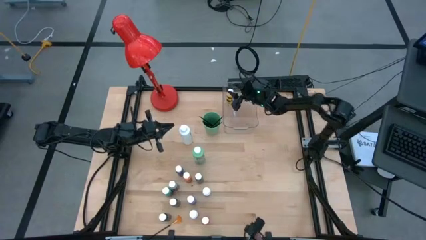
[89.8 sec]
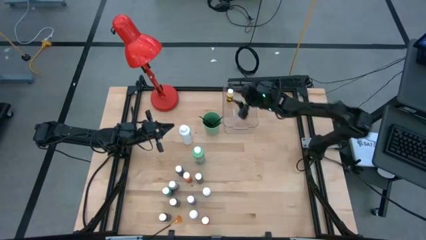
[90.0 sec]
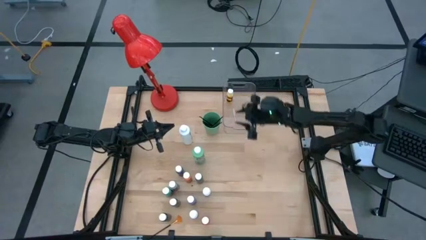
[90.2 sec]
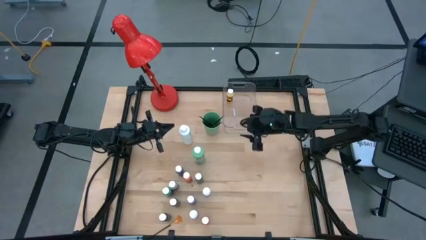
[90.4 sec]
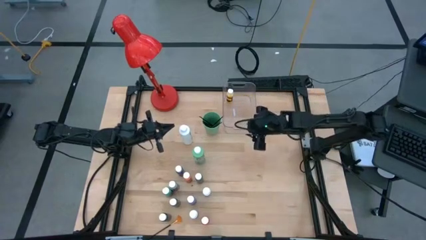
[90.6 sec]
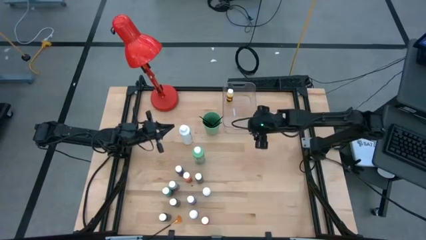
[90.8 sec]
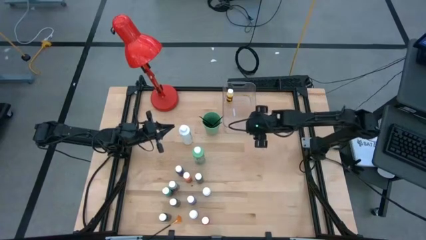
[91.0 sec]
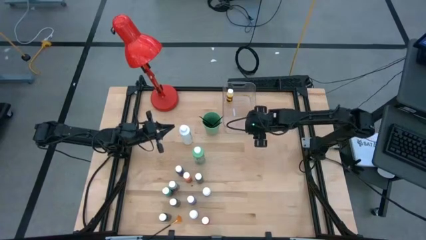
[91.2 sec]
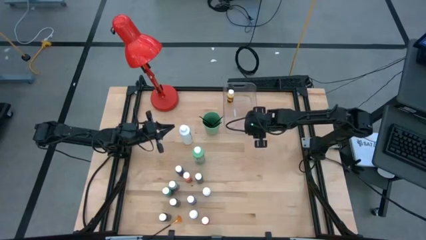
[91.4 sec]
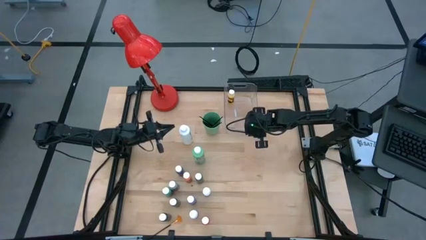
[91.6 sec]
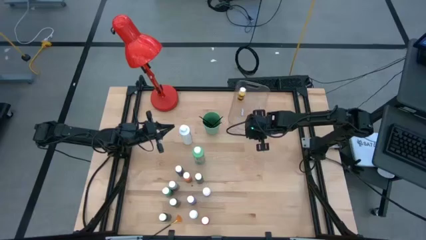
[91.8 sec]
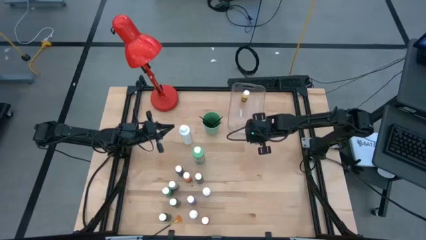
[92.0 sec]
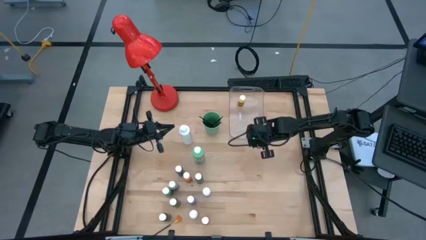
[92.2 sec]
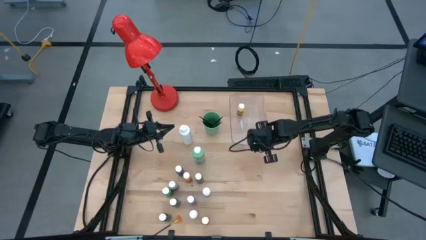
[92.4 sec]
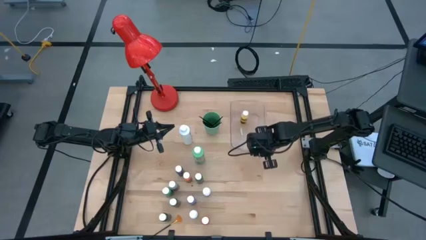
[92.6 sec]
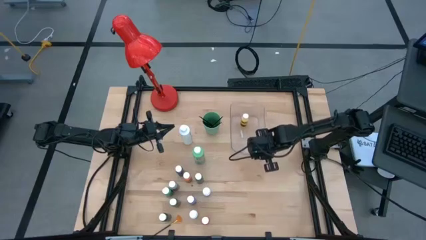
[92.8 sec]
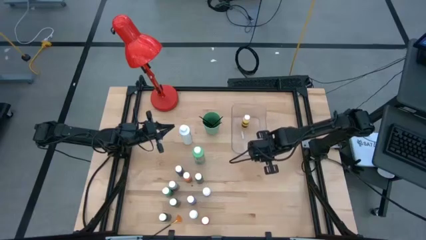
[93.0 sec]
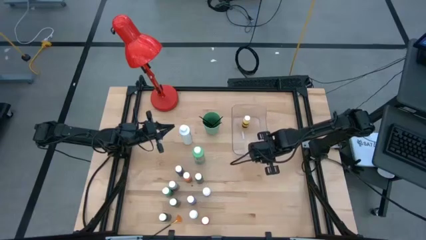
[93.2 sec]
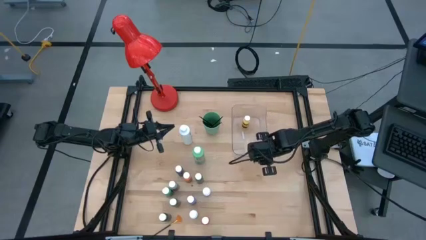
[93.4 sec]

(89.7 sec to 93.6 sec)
Task: Pick & Place Paint Supplies
Adjust the transparent bin

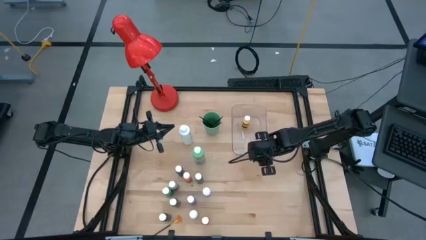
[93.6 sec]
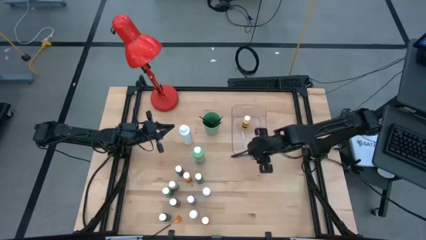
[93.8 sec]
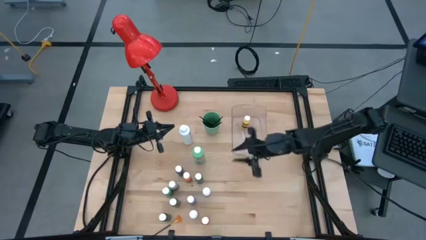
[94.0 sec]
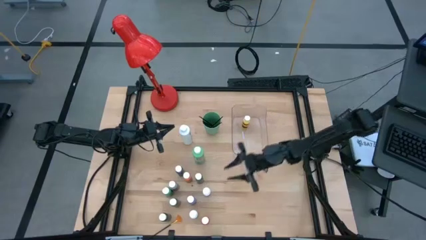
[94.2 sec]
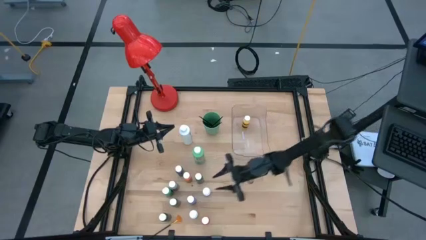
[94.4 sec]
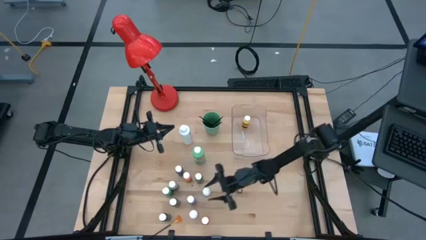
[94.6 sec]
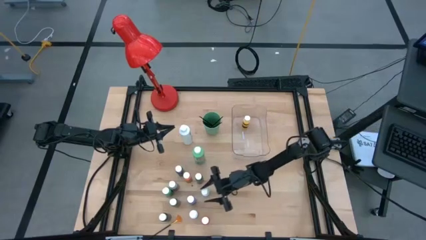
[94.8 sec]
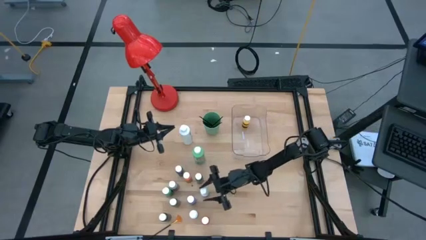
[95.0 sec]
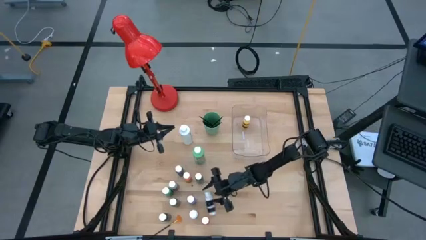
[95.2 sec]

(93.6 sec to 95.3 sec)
Put the white paint bottle into the transparent bin

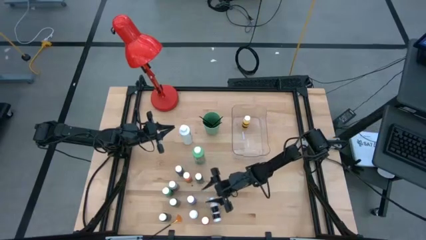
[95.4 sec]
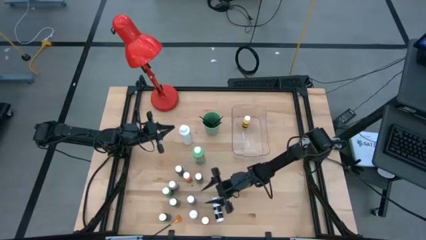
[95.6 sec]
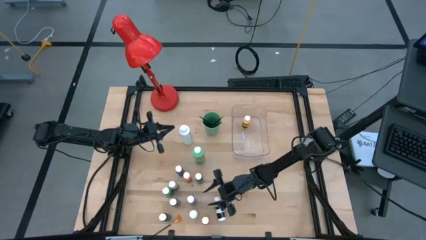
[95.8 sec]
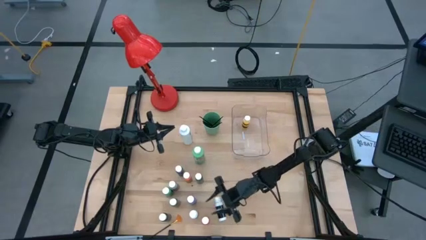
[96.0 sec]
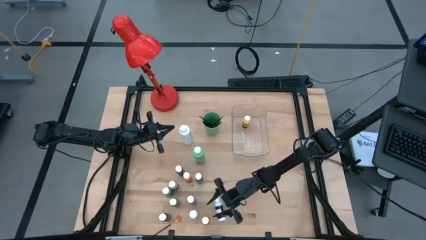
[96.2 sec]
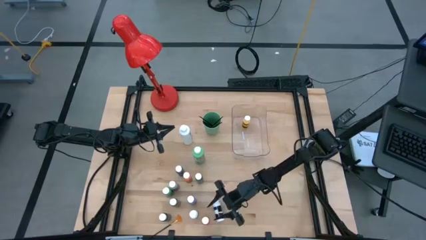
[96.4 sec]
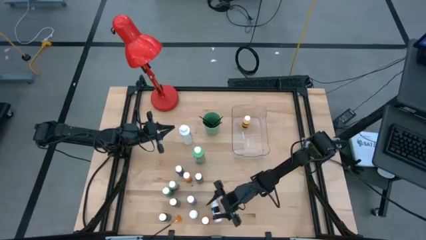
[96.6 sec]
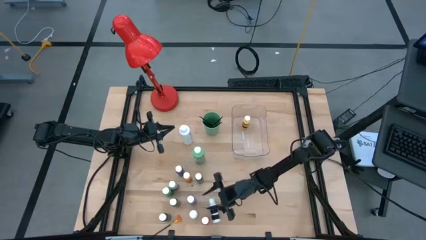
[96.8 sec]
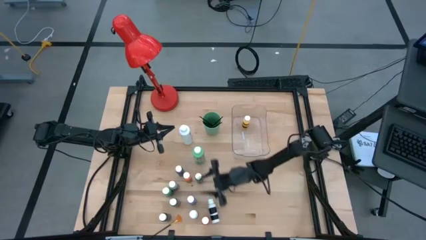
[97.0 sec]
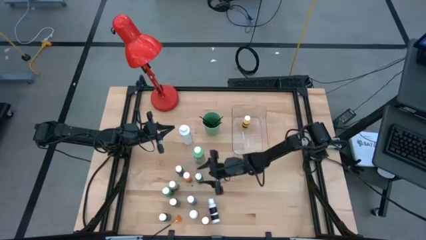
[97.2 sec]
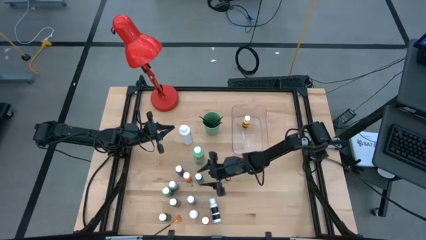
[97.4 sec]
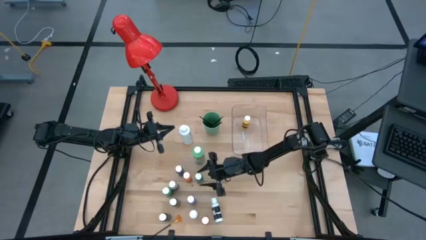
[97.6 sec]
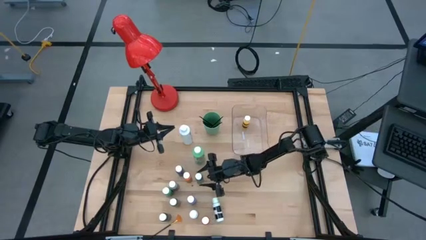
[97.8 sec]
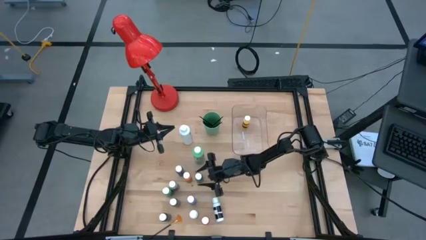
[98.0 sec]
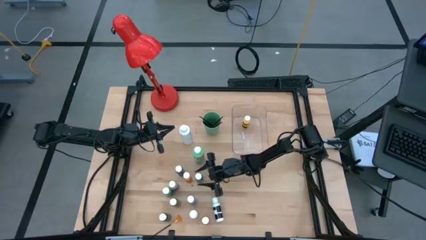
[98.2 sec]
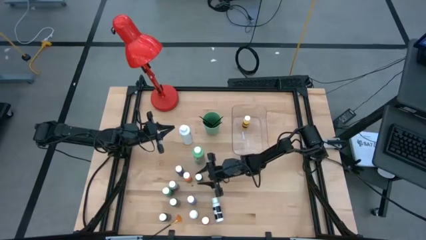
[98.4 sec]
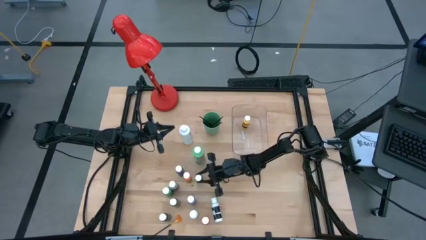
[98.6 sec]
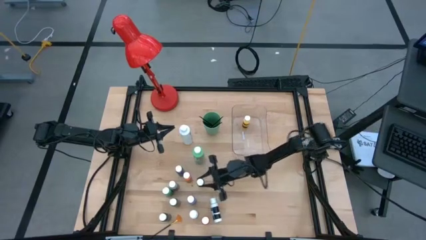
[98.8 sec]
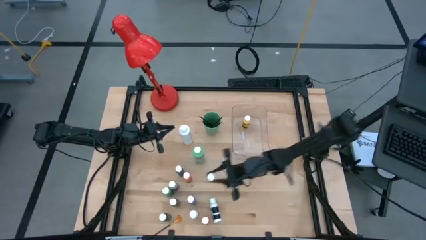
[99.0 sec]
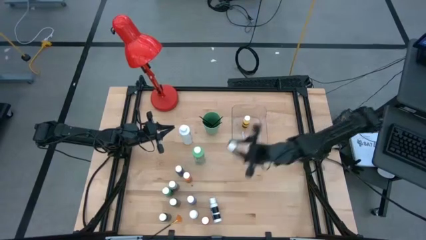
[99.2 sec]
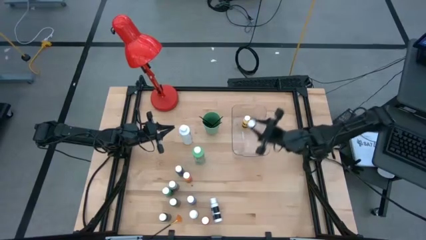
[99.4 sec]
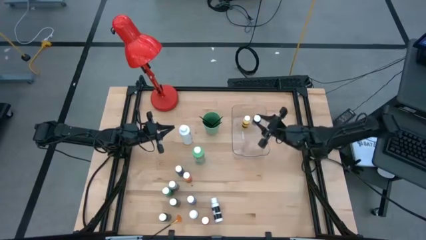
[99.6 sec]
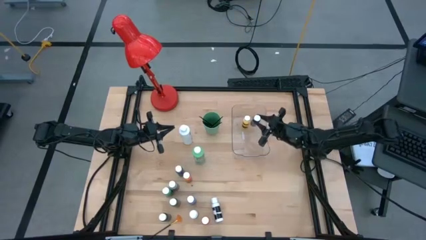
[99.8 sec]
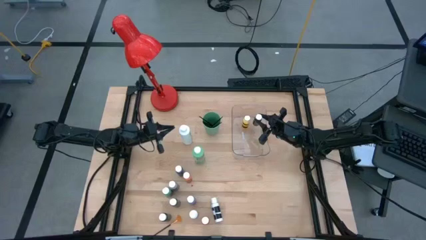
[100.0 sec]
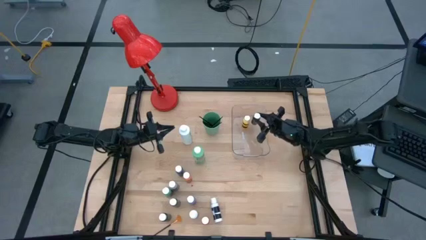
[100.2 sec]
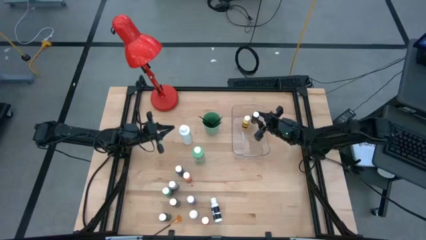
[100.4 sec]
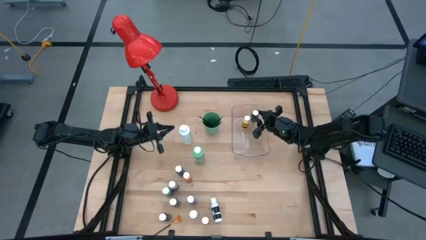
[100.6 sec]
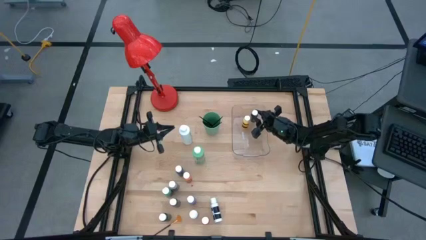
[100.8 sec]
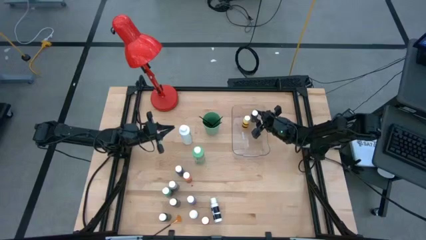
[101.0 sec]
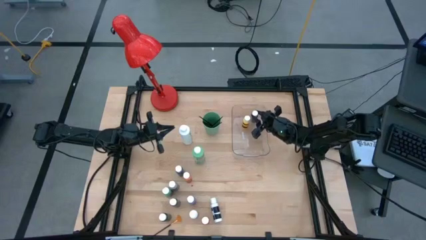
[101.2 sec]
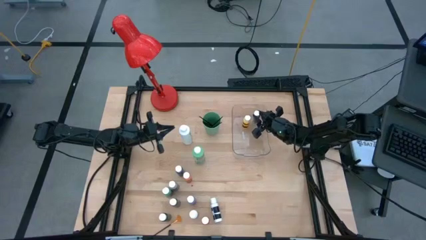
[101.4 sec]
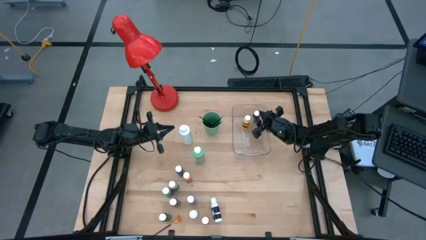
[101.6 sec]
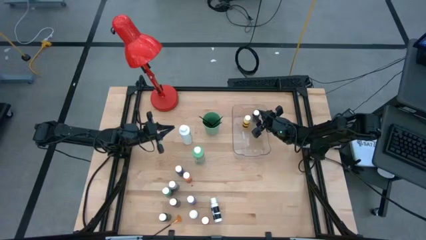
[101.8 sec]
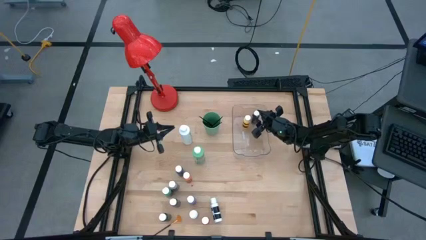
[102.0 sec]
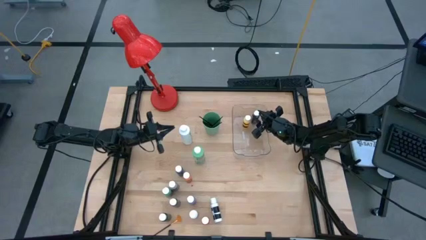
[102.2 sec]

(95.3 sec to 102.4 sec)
Put the dark green paint bottle into the transparent bin

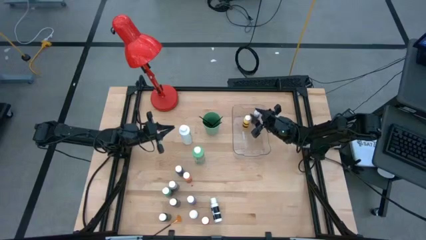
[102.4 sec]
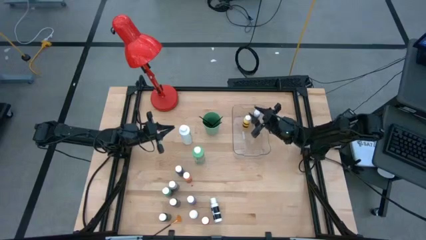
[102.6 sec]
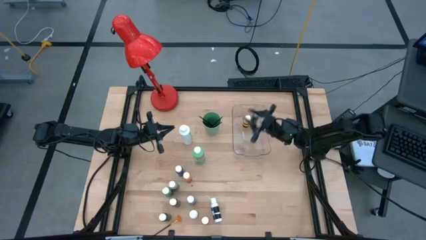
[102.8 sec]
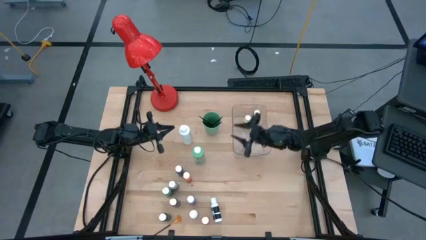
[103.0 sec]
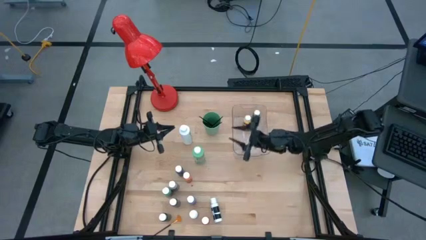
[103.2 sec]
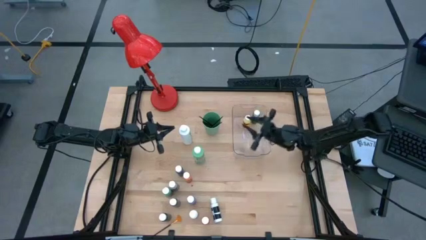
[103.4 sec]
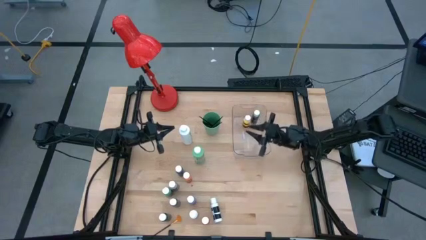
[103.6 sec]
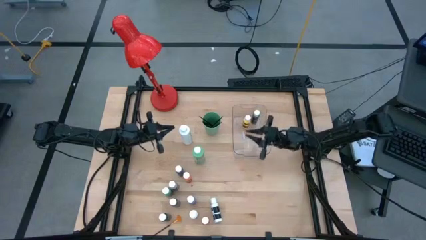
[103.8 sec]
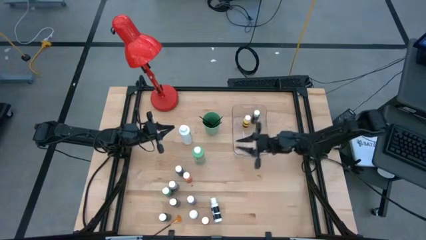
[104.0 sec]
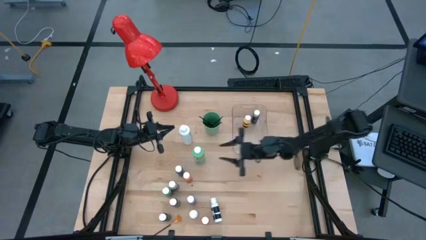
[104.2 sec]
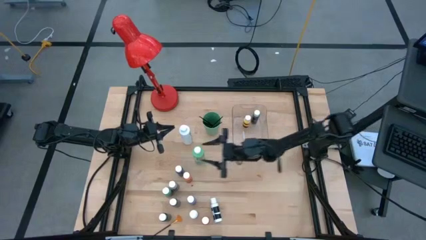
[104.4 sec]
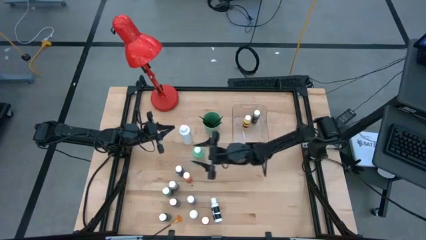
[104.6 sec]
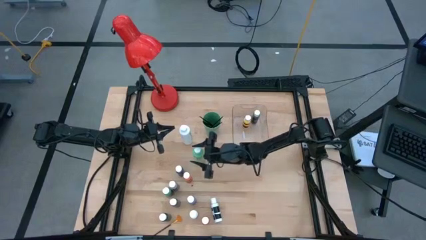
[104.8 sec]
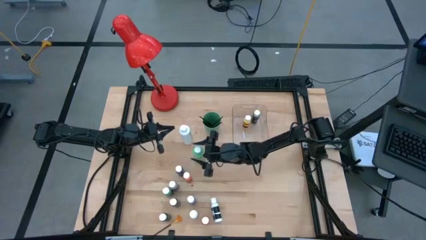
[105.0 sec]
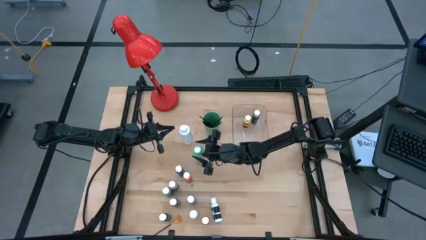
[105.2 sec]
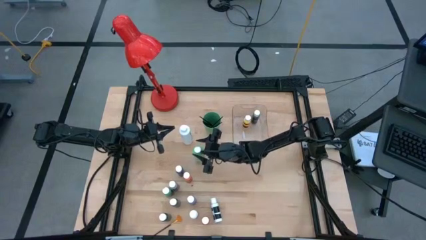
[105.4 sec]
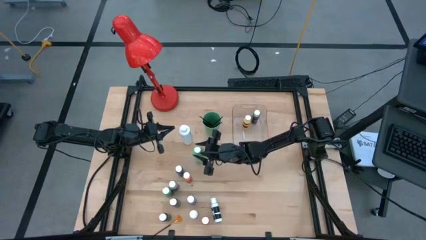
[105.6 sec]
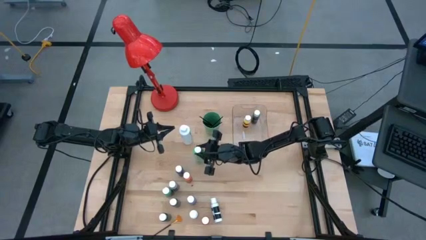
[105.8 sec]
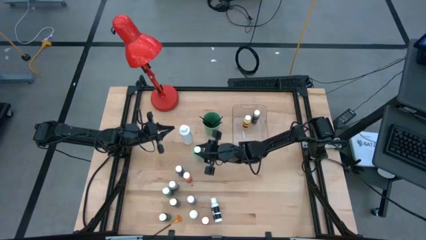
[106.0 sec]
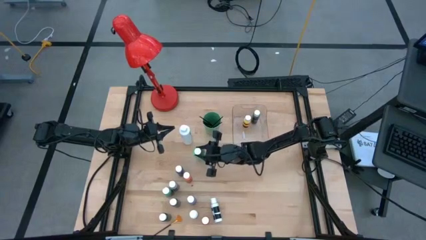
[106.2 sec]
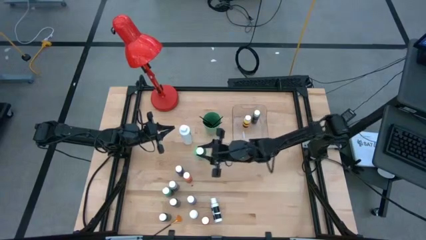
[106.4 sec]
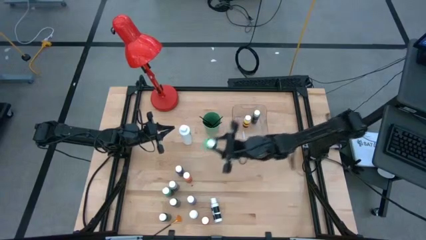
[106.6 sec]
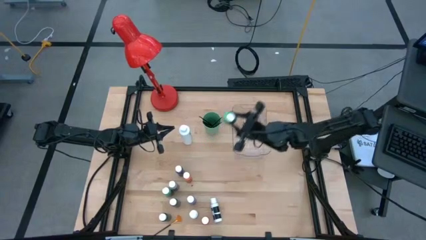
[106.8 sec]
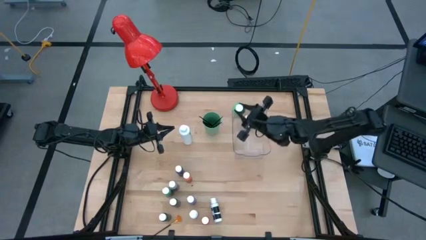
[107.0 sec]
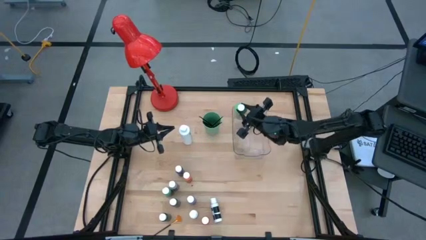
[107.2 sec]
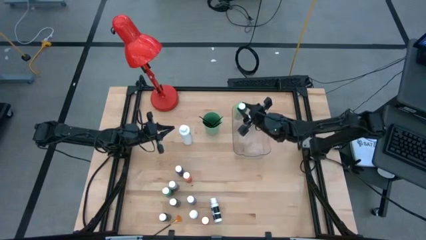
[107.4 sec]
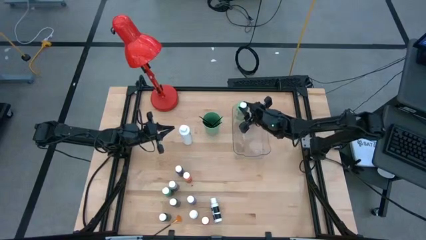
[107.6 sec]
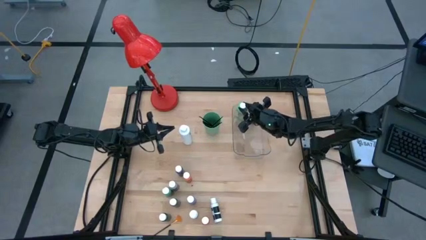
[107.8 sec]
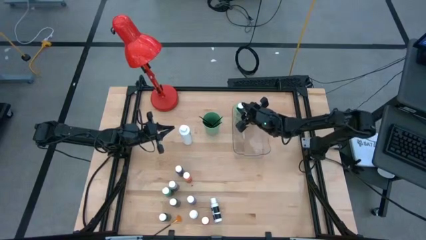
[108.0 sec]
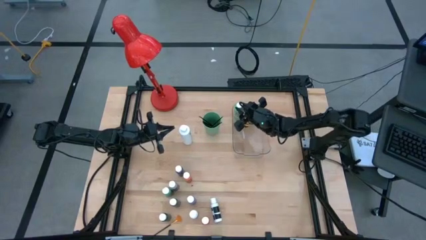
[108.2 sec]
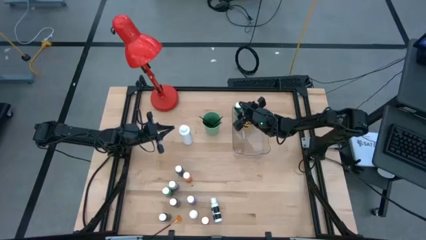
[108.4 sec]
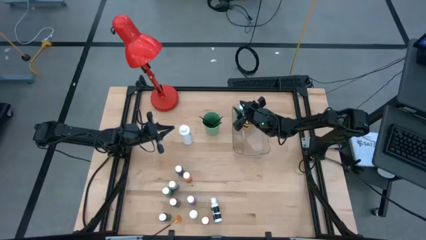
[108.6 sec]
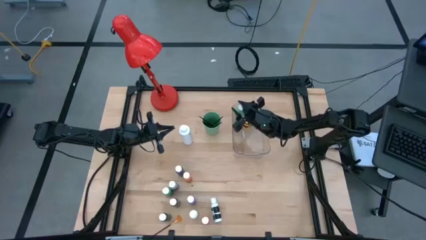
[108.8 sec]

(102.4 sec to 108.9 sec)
Put the light green paint bottle into the transparent bin
